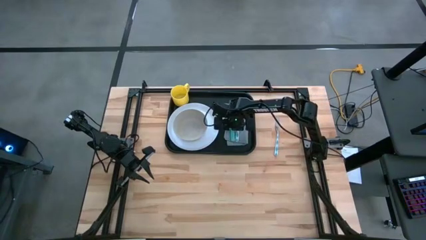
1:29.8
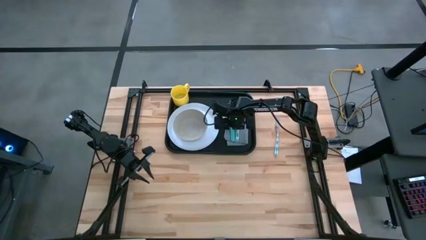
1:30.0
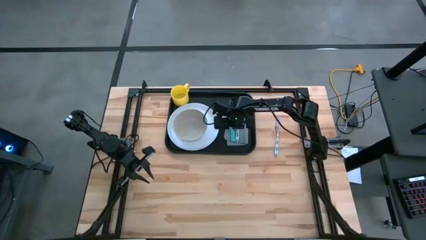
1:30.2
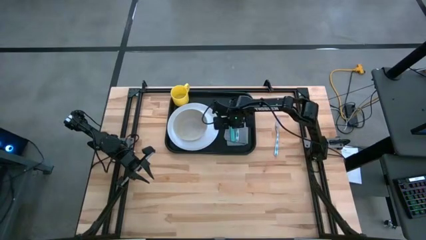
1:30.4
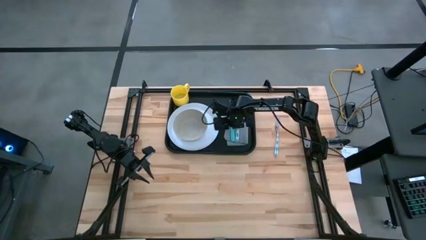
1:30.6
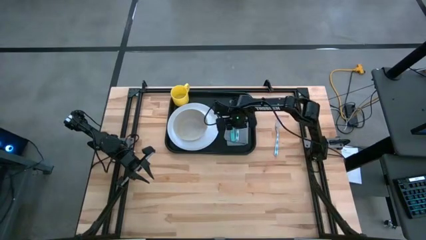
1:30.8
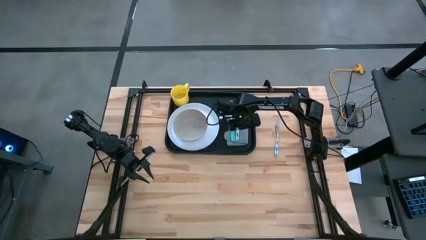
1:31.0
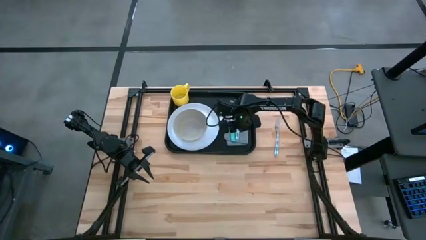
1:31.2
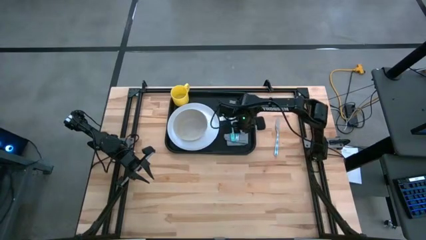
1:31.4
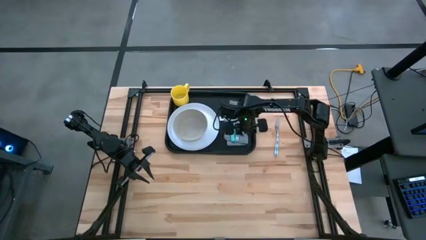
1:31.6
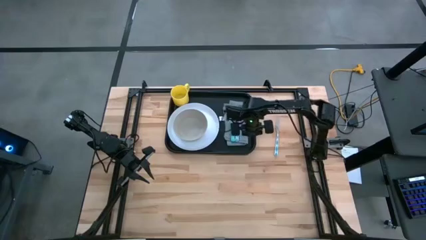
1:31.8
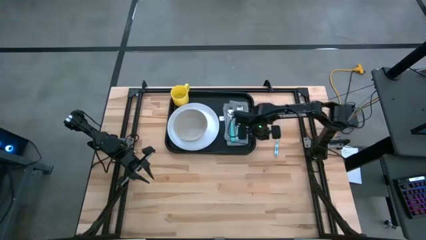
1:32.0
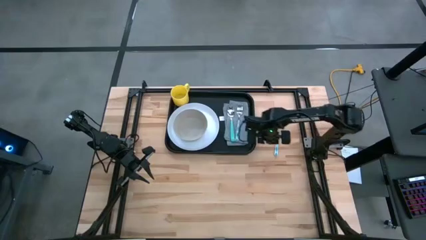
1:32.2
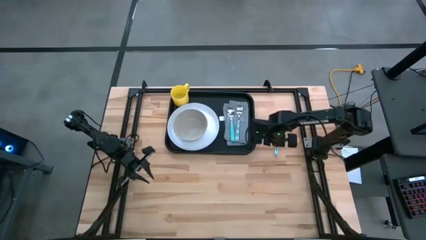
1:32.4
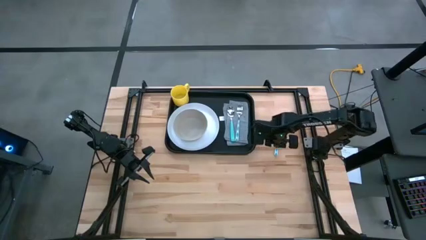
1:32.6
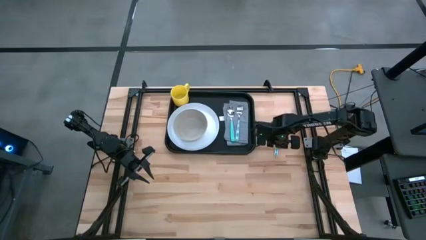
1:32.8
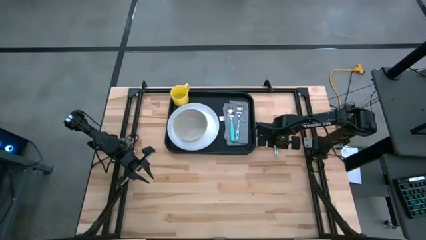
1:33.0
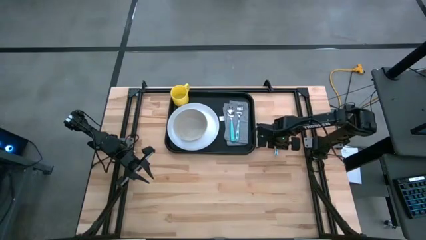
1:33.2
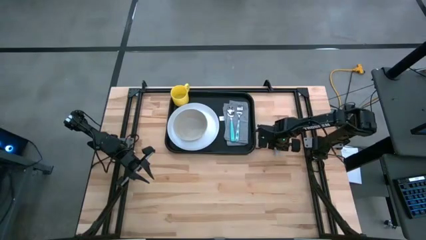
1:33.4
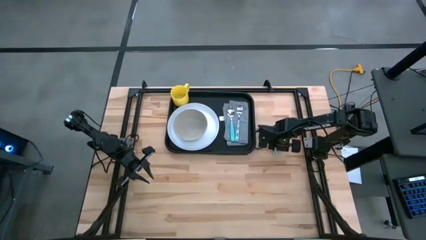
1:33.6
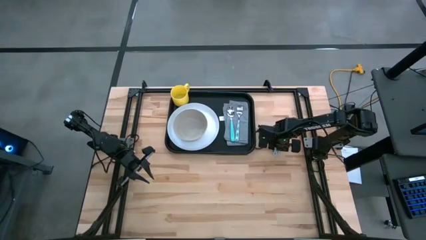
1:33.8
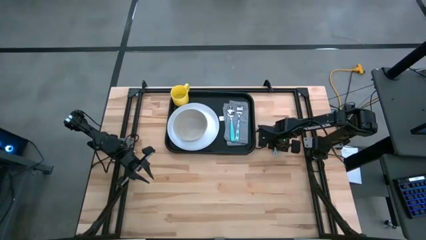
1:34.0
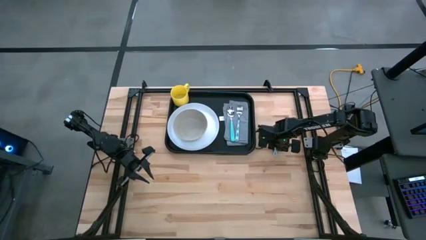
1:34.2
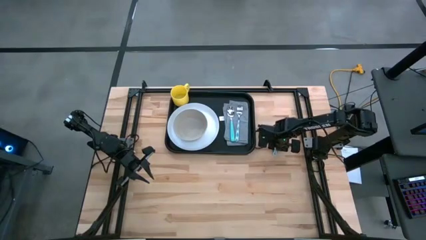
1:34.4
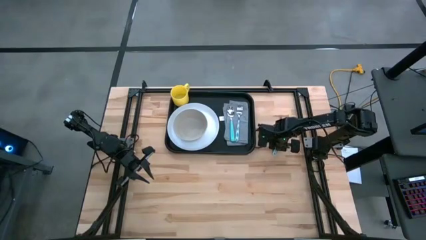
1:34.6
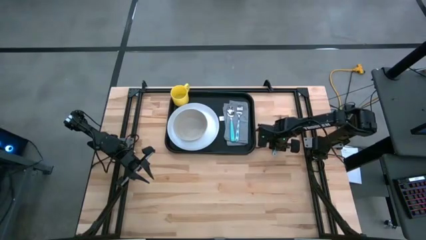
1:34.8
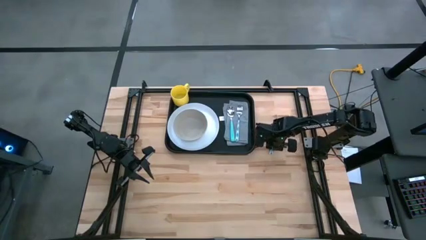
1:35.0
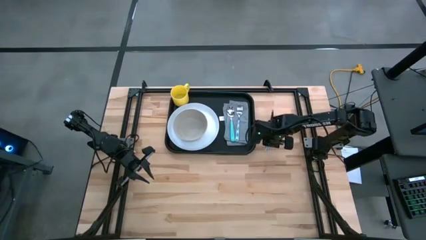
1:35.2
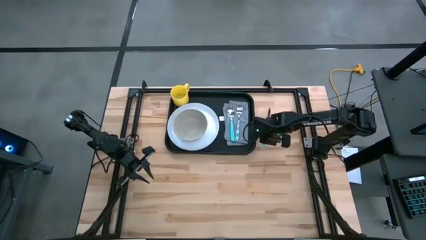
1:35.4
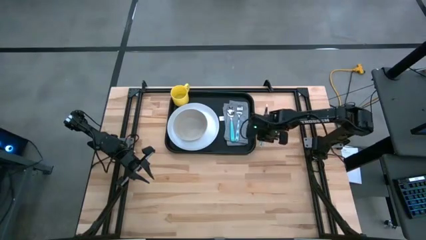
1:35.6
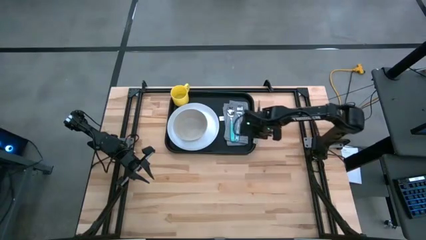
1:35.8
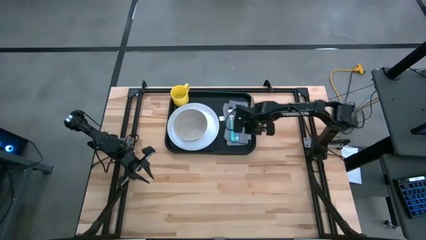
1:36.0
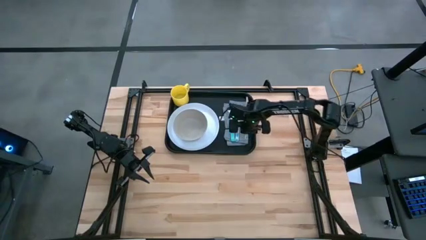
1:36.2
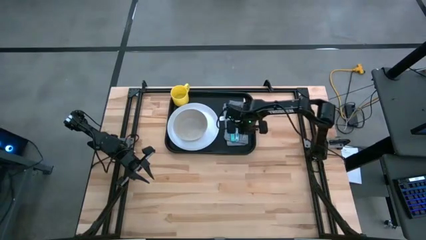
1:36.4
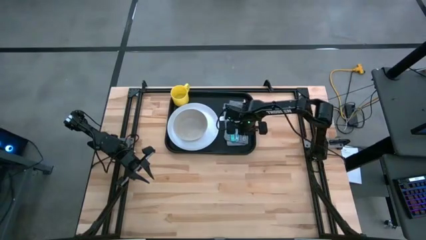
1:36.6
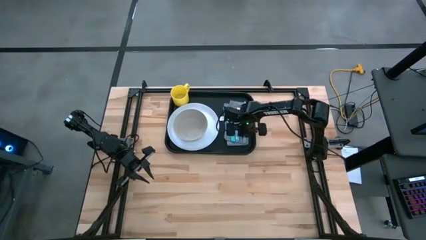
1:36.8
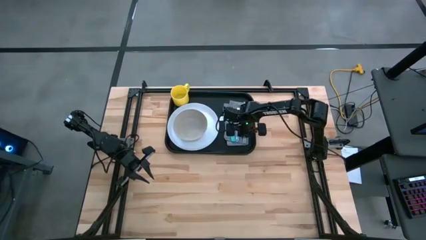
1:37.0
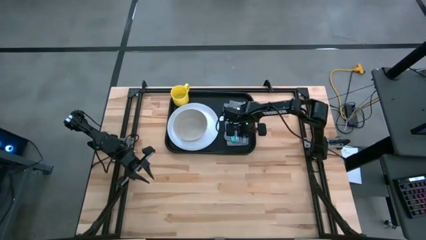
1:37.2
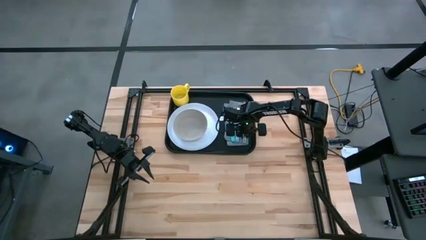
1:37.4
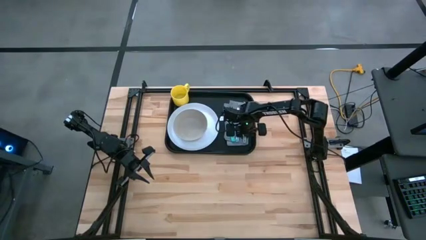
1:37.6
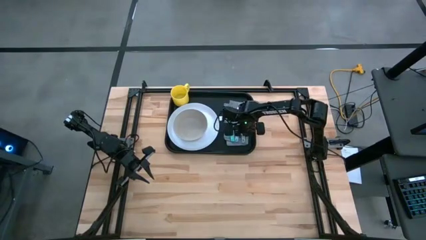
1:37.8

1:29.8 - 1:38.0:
Task: Set up tray
Put the white table knife to the right of the white fork on top of the gray napkin on the black tray

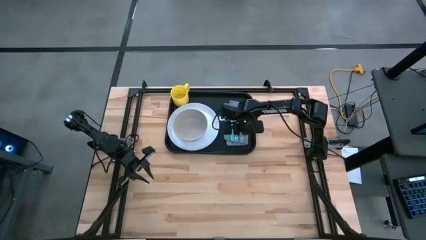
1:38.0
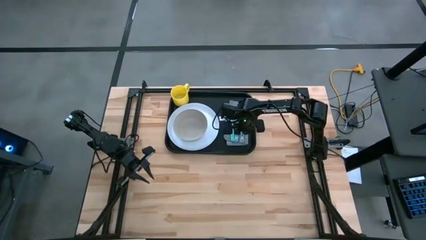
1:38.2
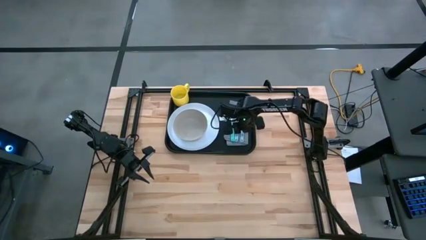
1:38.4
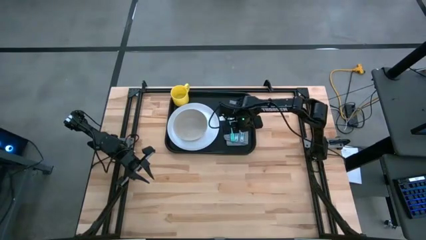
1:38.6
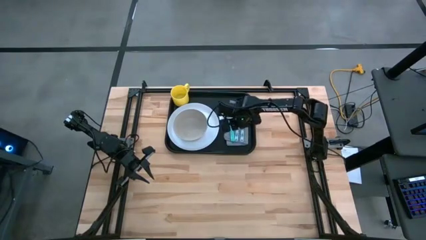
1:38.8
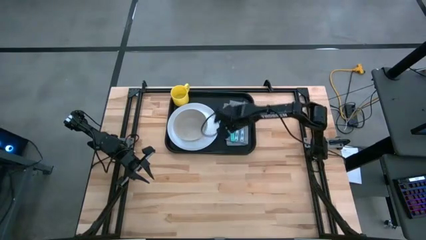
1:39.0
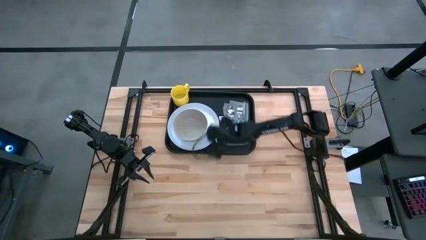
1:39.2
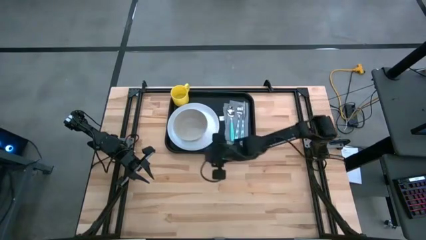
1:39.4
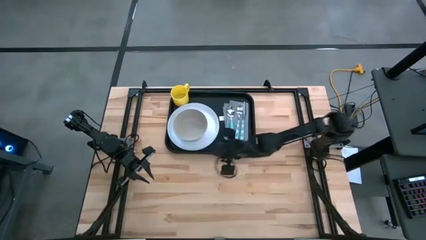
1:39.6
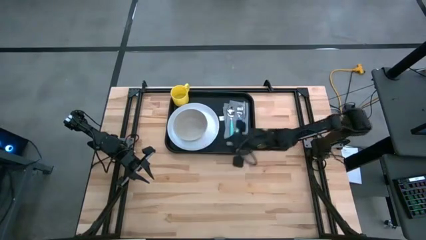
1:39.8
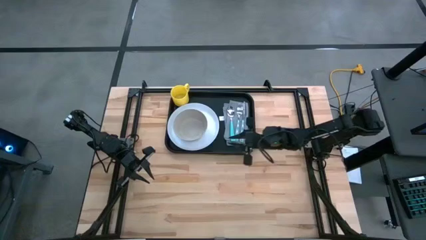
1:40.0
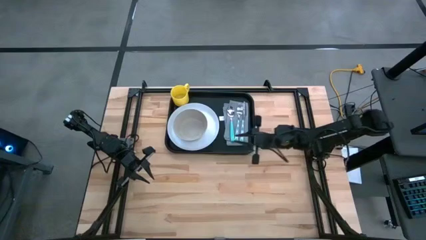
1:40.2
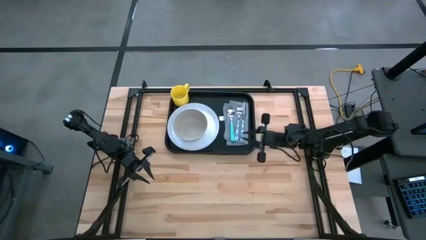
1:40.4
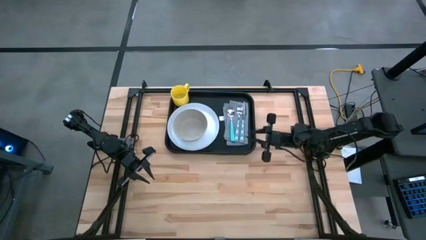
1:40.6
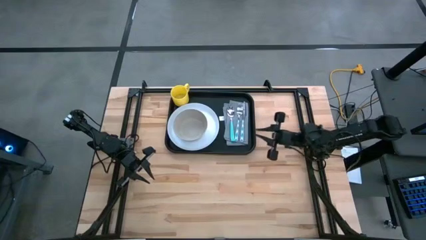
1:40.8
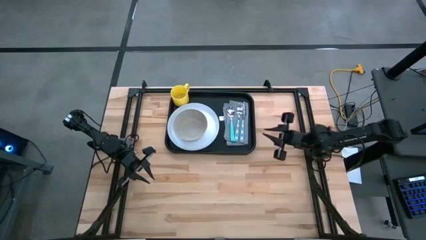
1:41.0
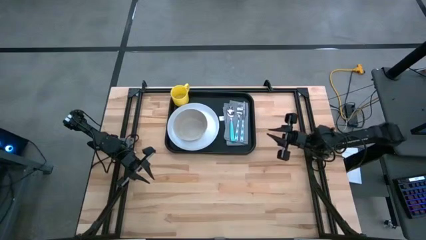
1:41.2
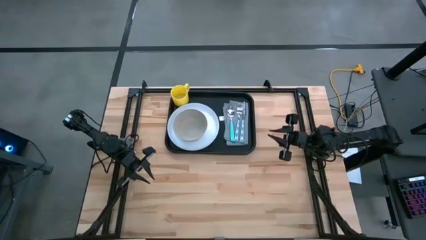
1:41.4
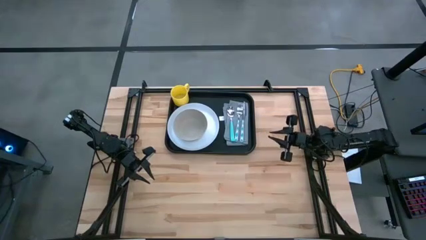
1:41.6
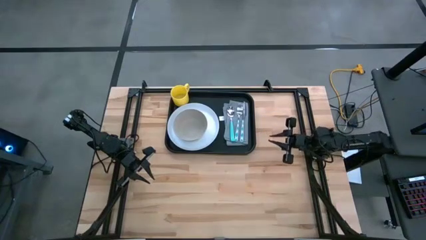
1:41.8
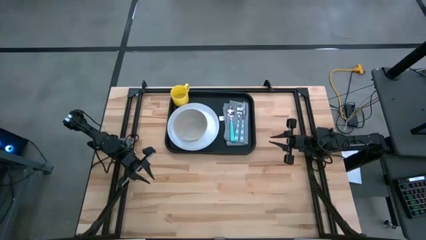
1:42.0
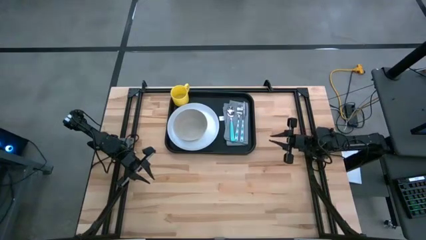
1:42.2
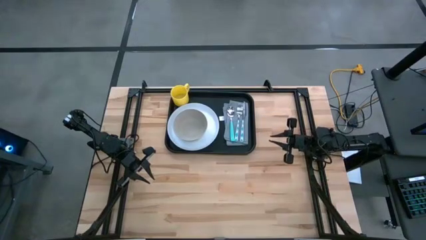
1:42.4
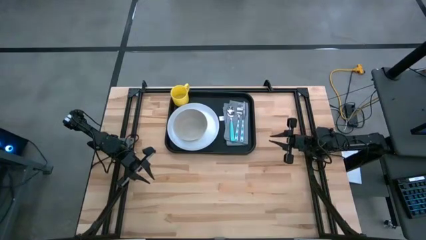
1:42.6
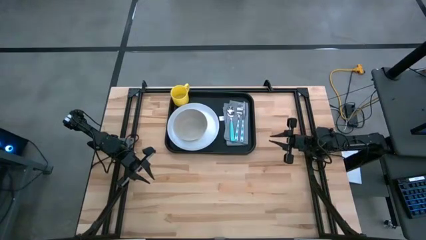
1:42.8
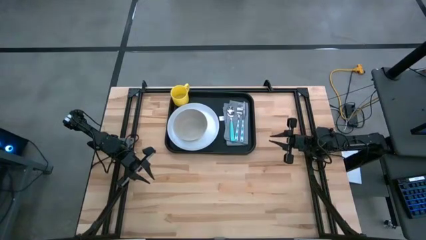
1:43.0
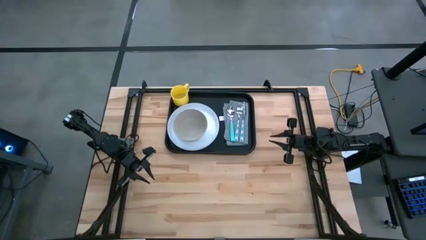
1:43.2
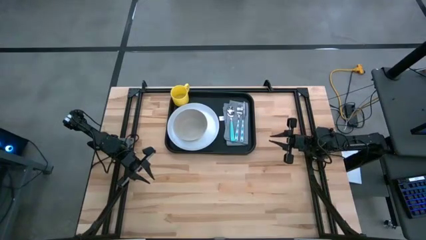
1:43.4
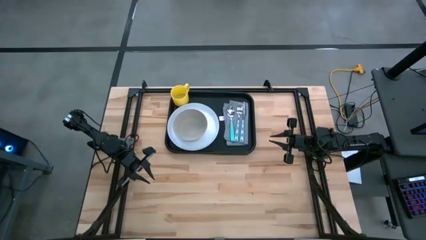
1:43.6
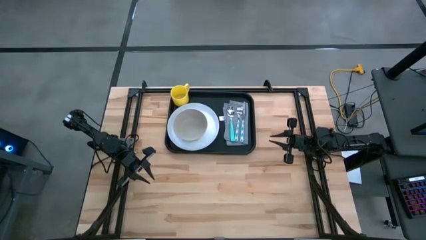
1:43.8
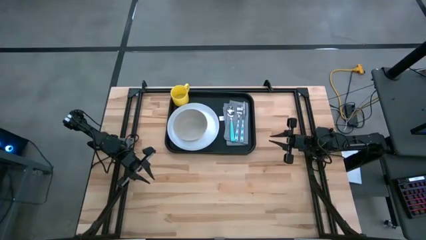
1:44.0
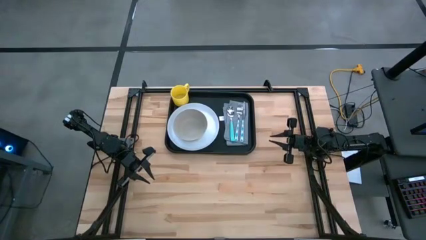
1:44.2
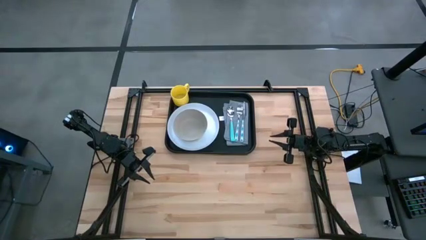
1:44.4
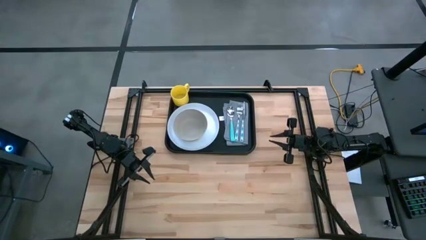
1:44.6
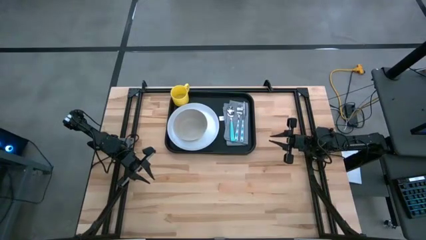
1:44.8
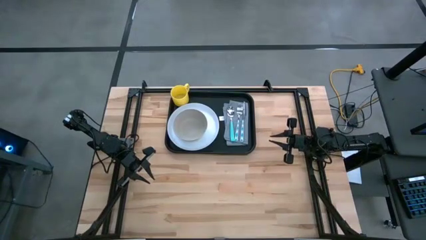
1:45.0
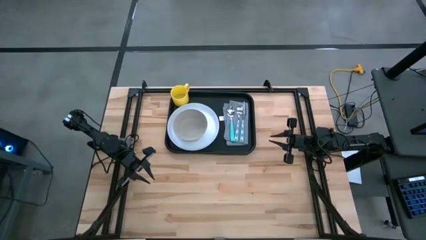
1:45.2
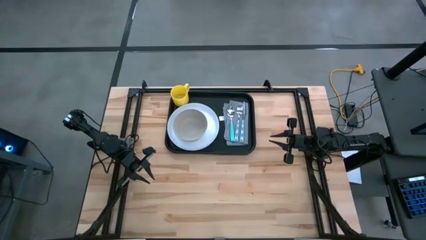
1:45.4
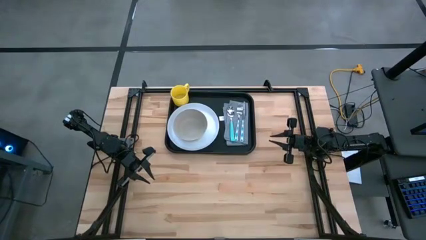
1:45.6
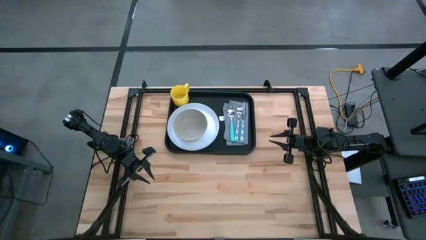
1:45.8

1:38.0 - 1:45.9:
Return to Home Position
